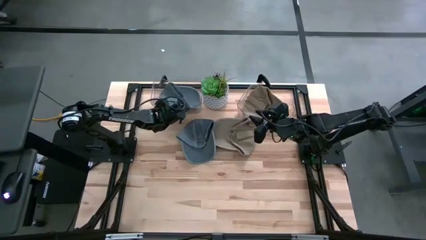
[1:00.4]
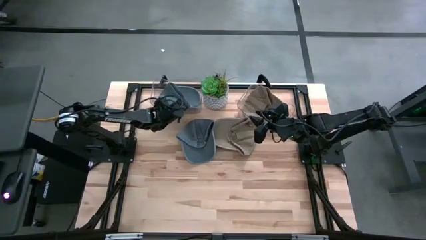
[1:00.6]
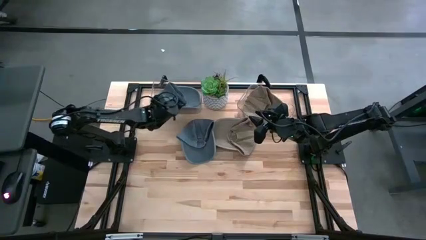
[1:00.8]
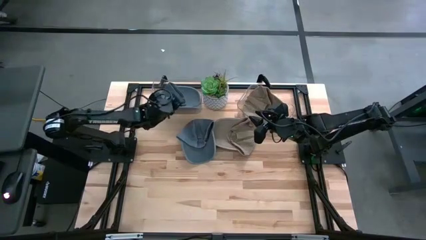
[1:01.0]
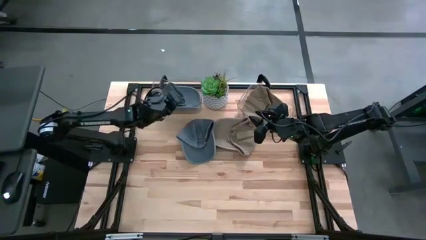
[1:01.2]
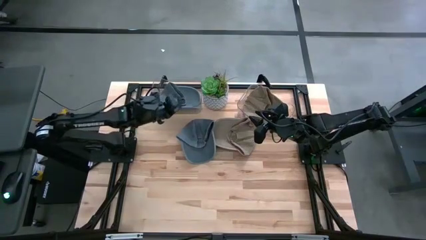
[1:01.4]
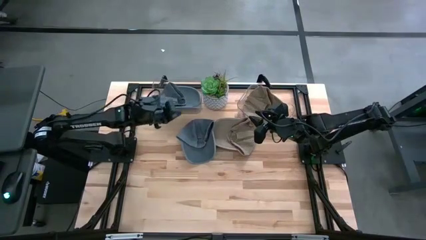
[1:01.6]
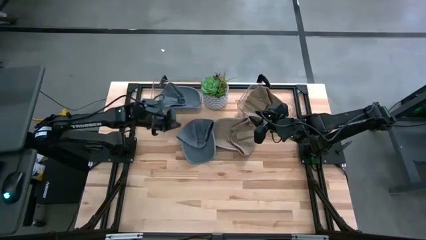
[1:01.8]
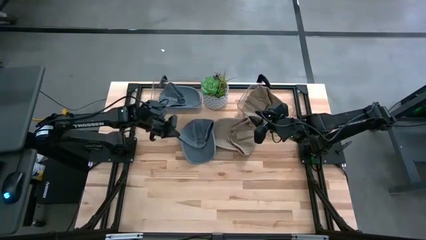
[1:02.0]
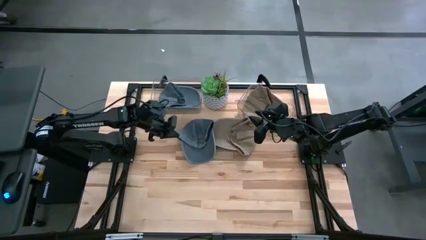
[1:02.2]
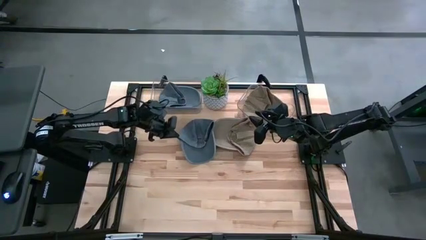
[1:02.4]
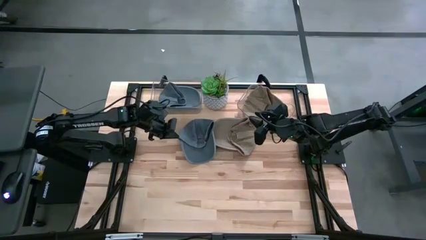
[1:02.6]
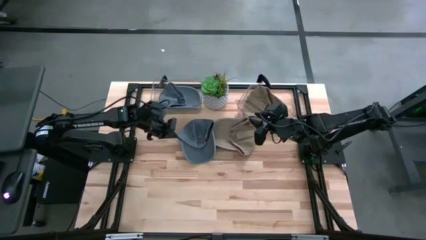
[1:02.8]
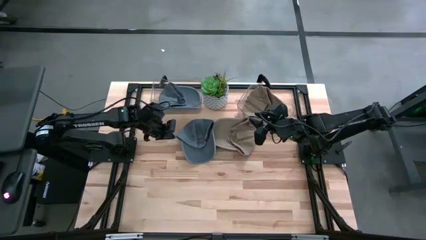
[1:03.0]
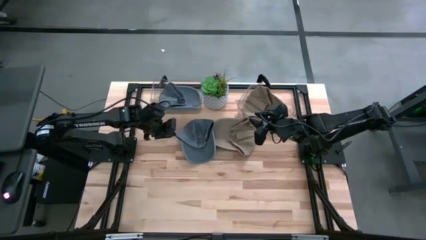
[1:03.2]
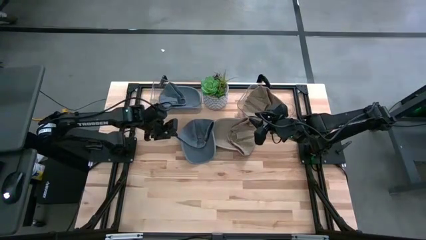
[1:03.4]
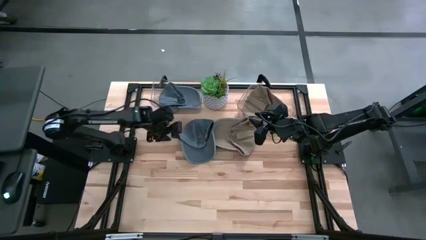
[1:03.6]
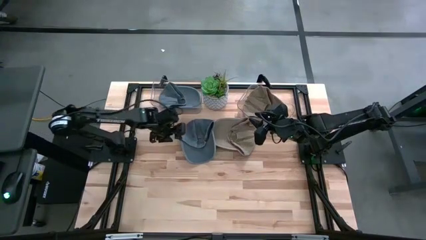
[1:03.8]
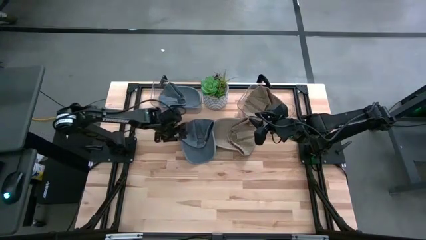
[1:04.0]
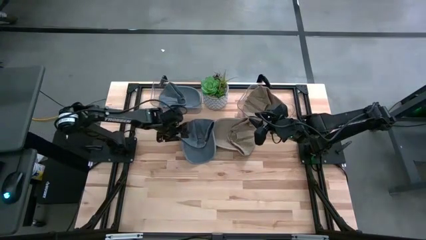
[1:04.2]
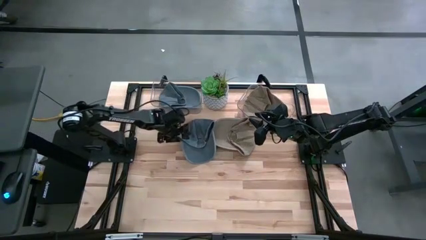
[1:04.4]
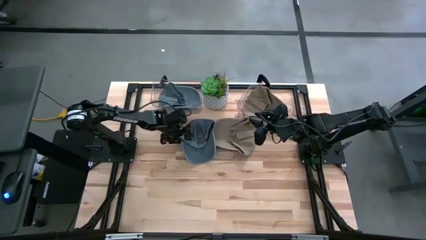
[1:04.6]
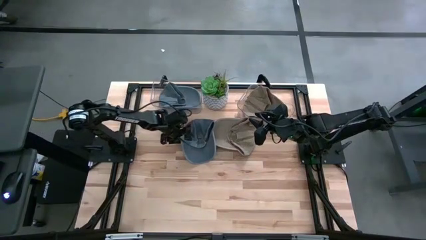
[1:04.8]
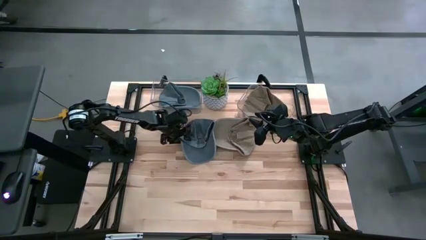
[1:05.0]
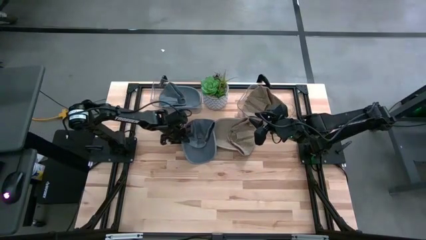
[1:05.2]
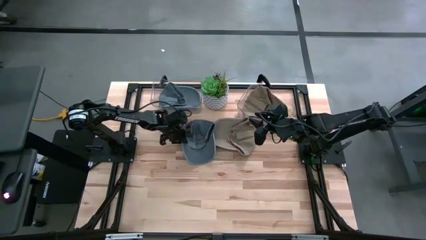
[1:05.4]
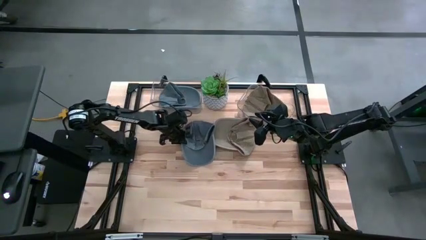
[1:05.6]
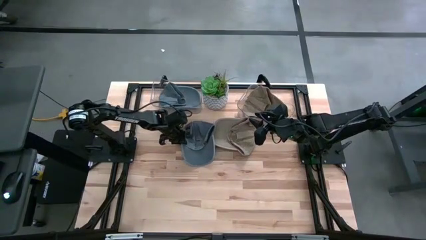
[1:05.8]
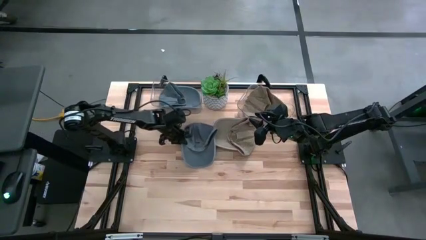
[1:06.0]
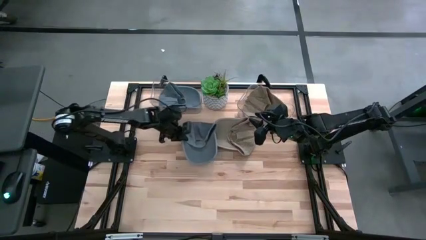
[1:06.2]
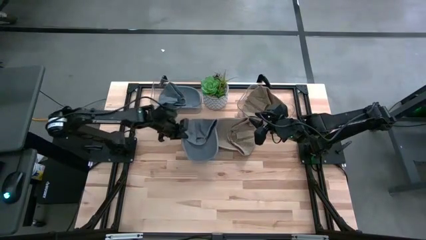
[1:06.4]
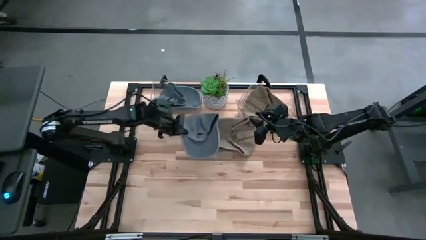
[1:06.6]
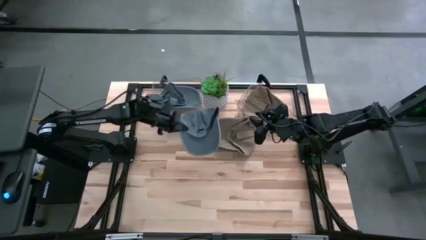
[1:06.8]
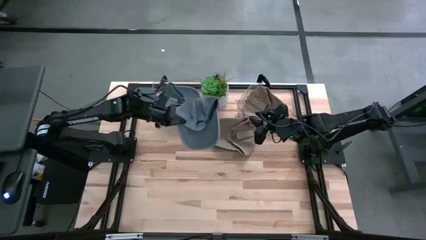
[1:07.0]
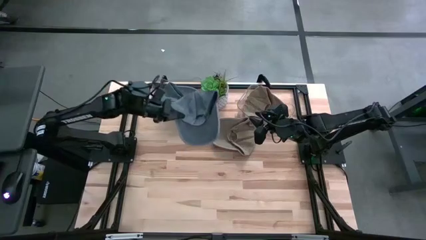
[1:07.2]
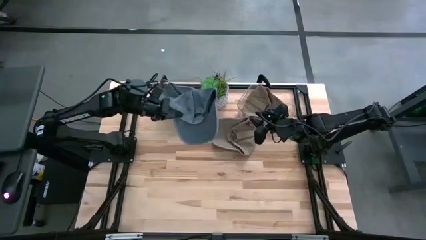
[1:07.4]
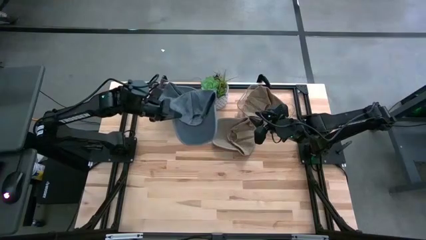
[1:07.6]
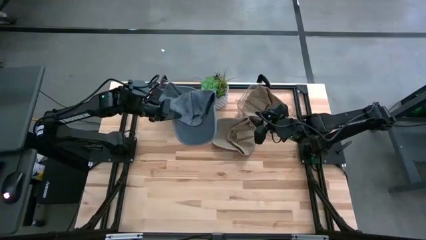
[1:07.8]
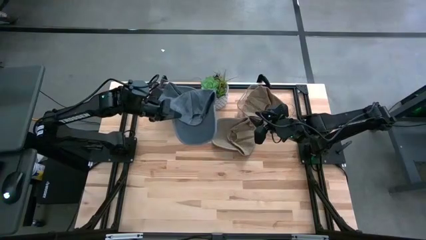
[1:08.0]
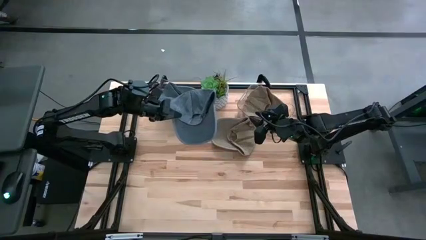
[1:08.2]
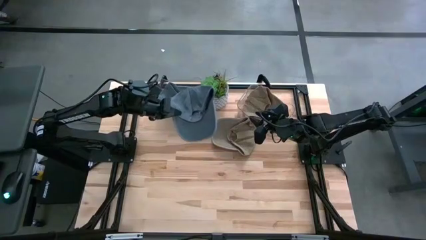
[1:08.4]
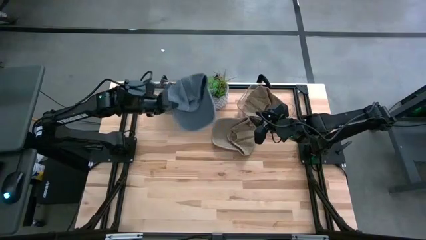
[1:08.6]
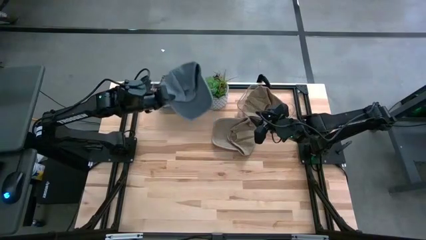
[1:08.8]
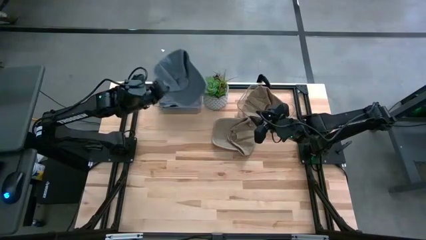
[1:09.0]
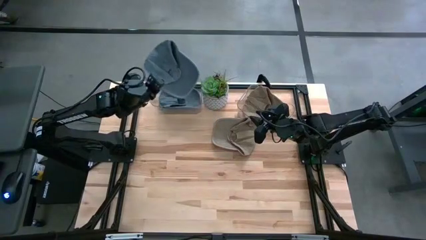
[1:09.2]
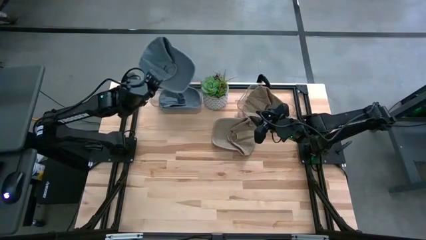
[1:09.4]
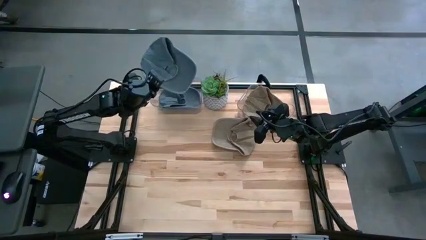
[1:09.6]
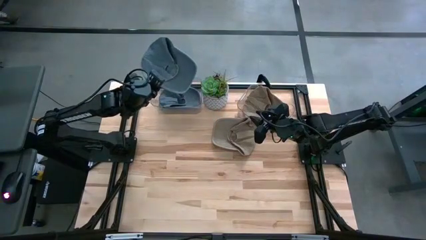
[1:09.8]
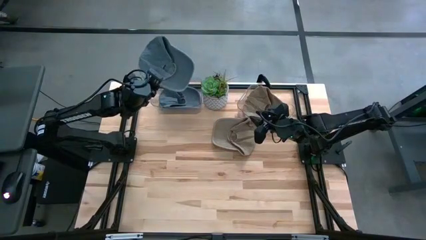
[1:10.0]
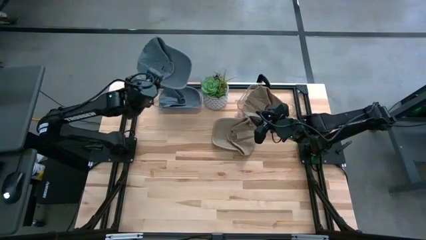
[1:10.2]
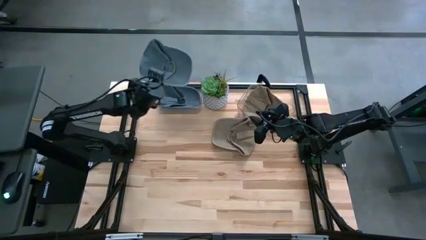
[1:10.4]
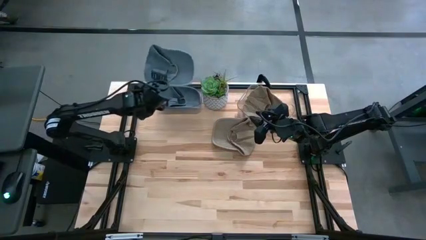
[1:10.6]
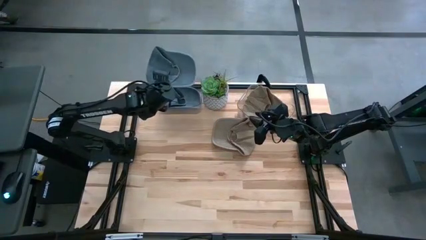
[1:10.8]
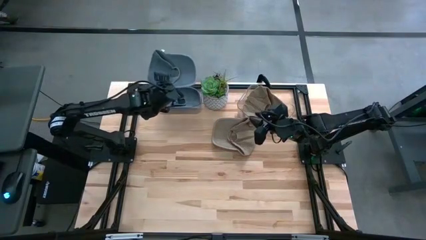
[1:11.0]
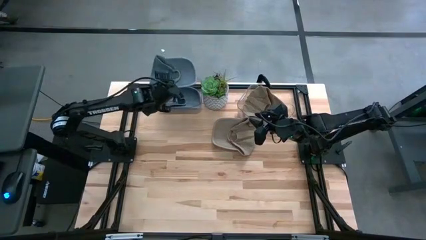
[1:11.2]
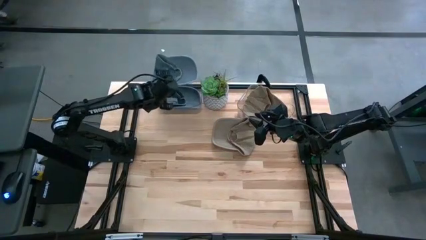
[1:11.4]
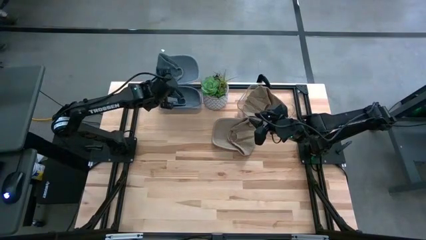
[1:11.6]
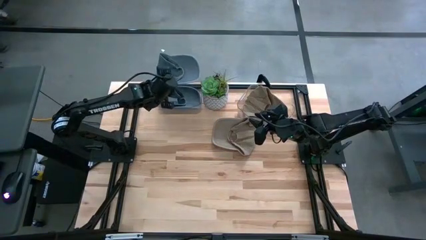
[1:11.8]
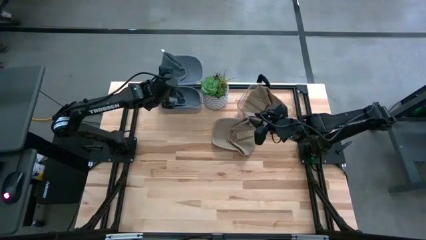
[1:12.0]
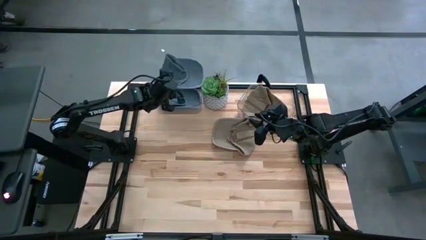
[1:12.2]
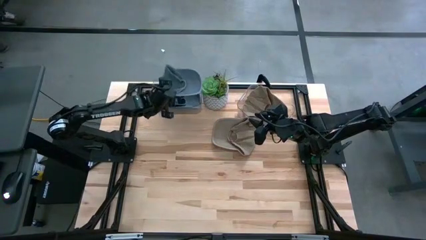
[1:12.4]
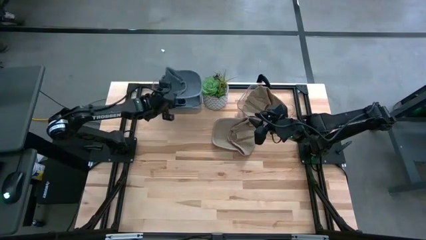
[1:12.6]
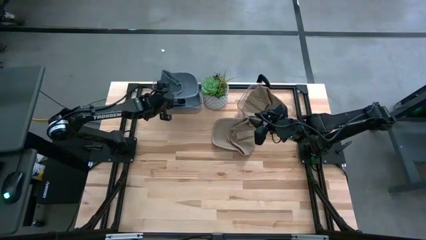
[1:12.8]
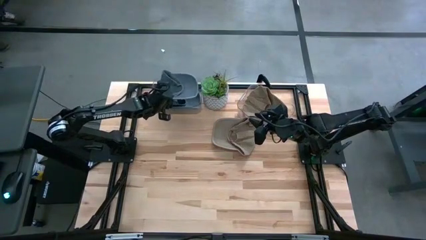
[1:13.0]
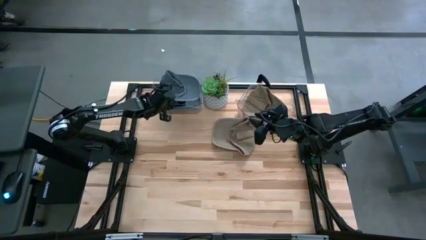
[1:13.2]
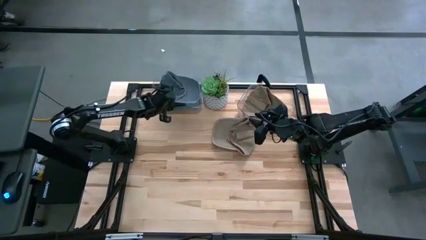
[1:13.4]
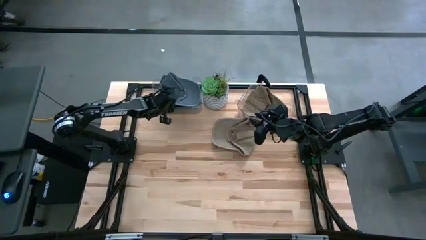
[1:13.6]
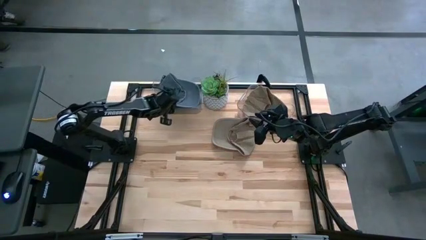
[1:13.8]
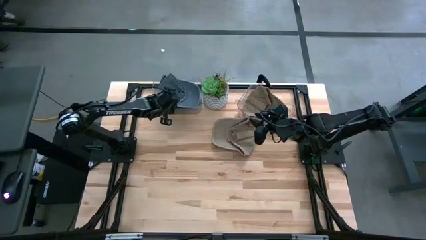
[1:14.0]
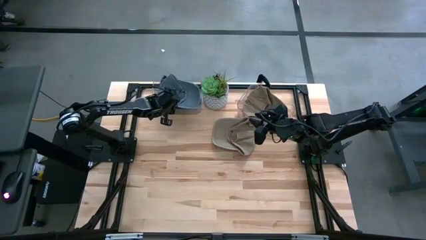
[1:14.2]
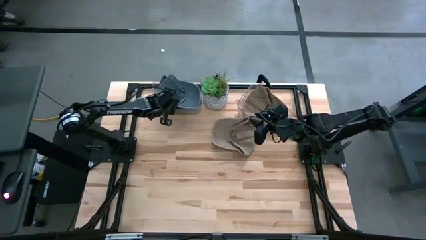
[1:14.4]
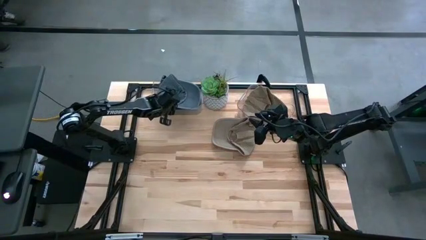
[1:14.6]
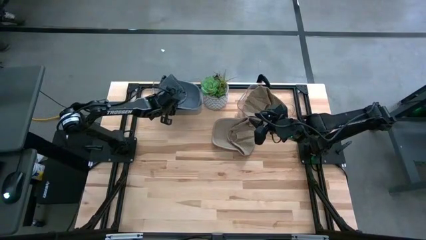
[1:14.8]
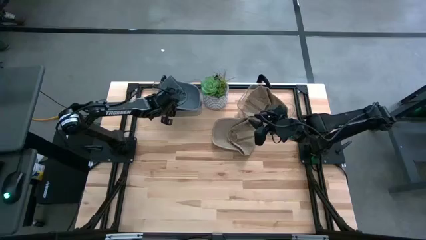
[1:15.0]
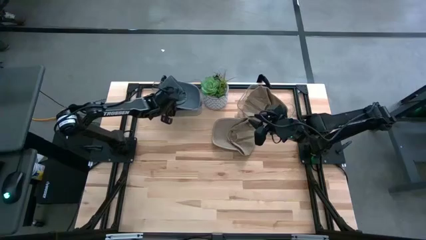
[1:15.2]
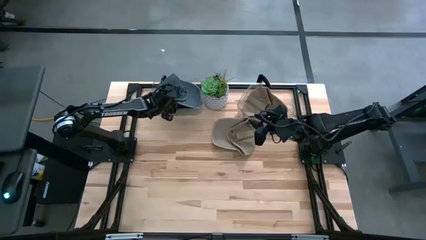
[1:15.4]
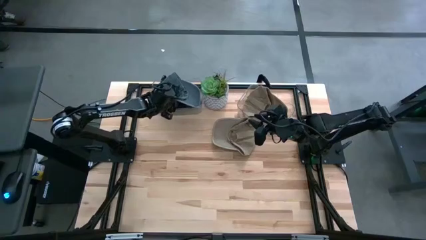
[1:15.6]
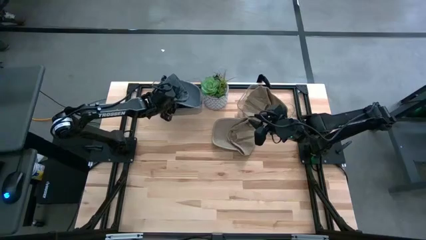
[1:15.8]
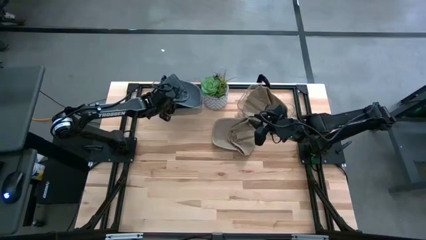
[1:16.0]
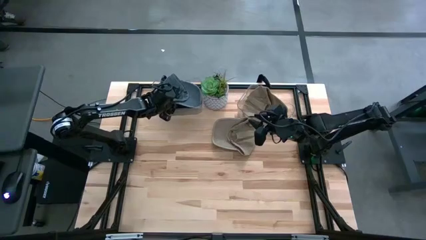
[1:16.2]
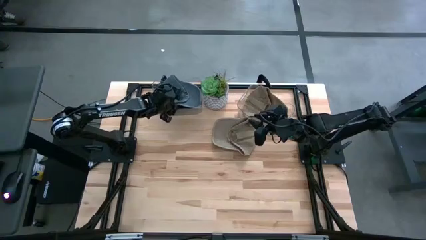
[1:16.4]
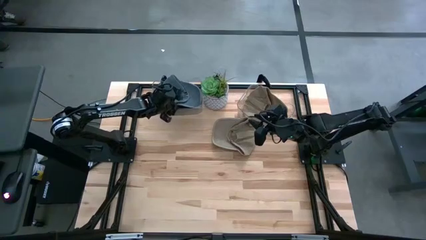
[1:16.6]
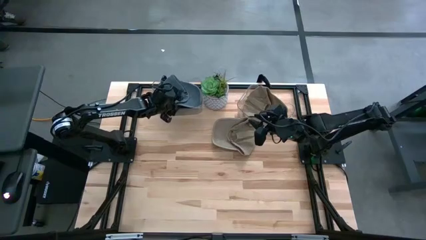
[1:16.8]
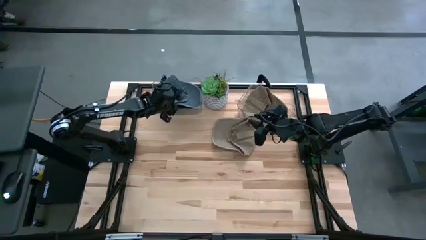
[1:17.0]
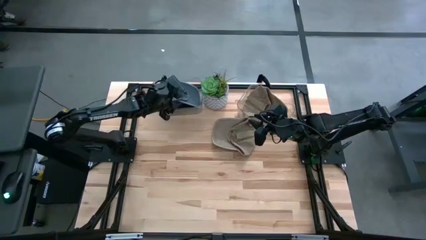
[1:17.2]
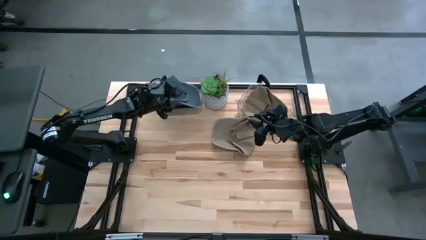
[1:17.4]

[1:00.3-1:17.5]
Task: Pick & Place hat
Put the blue cap into the left transparent bin
